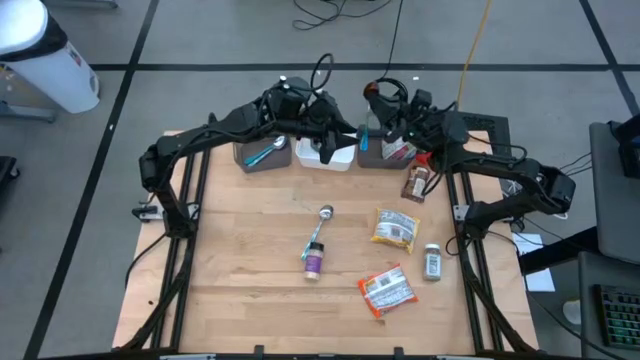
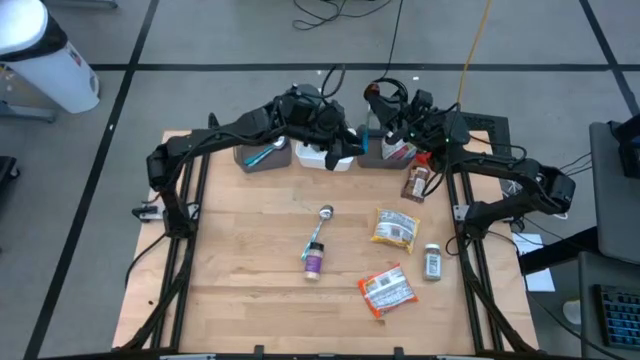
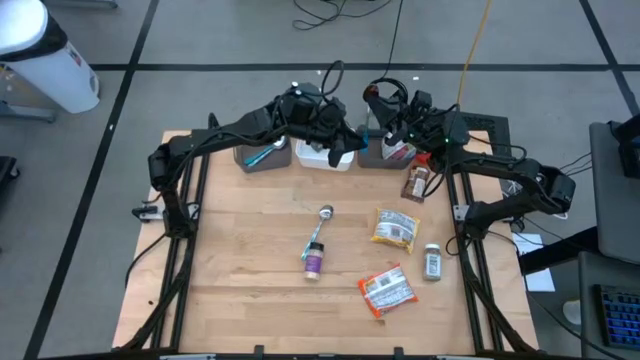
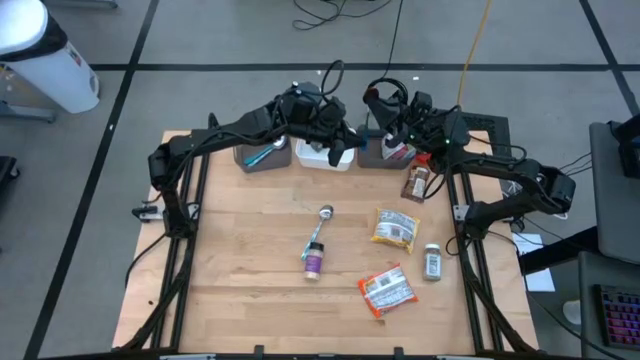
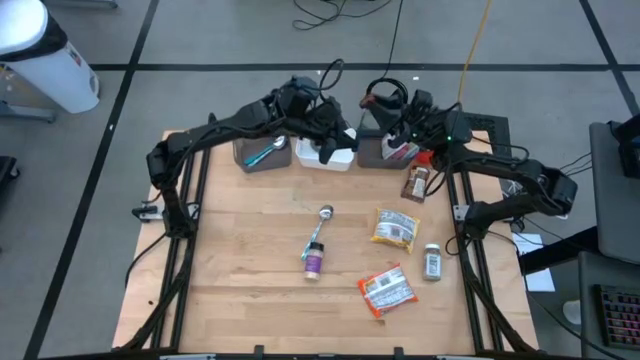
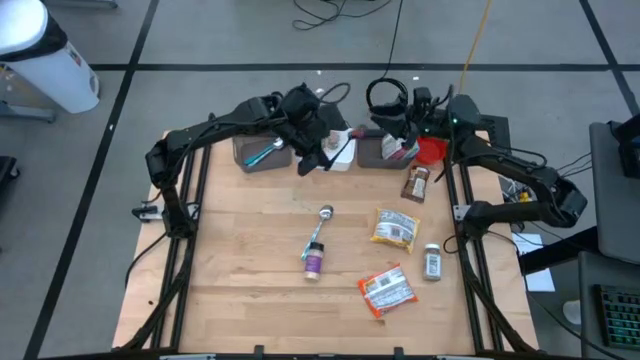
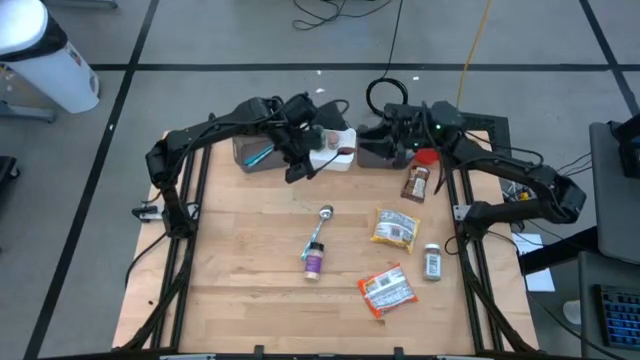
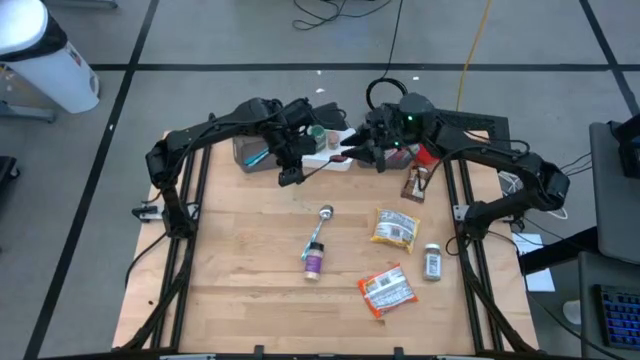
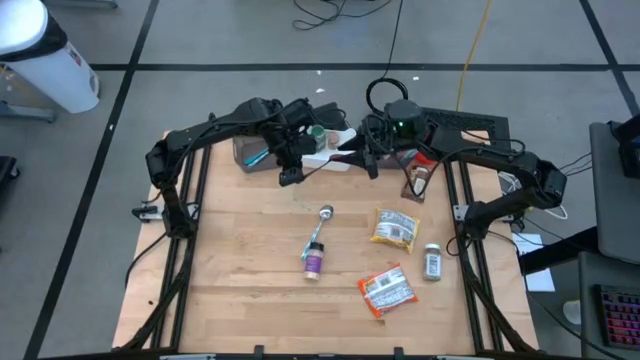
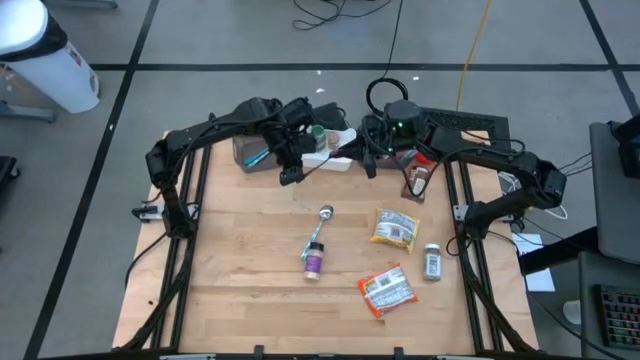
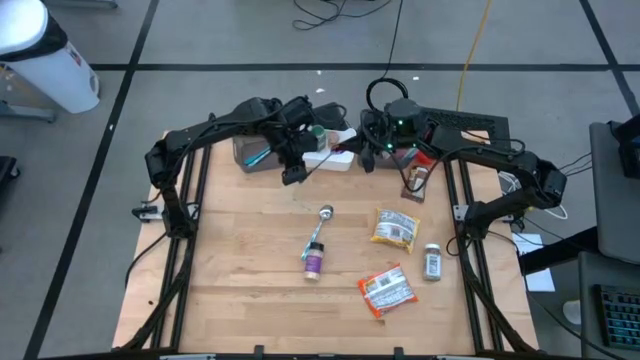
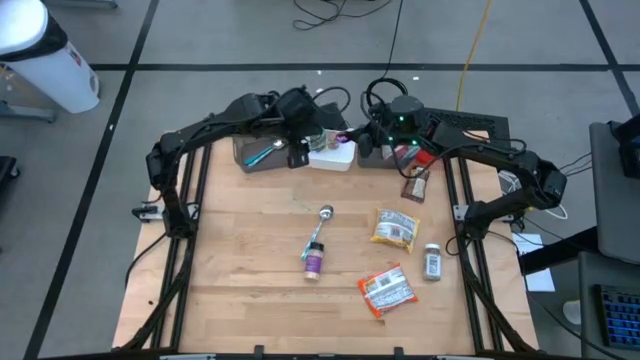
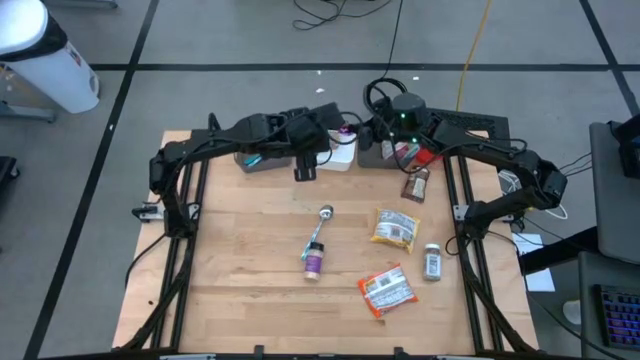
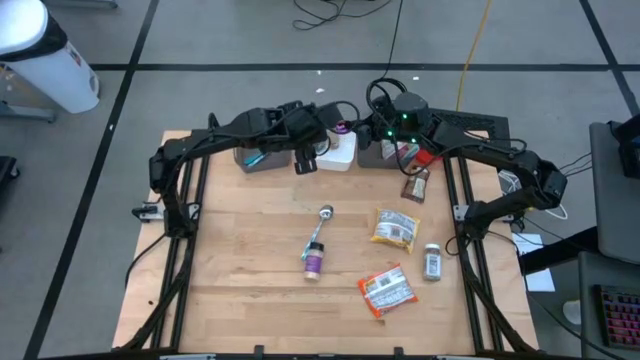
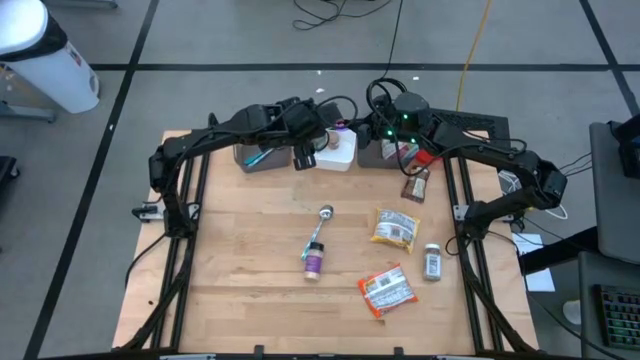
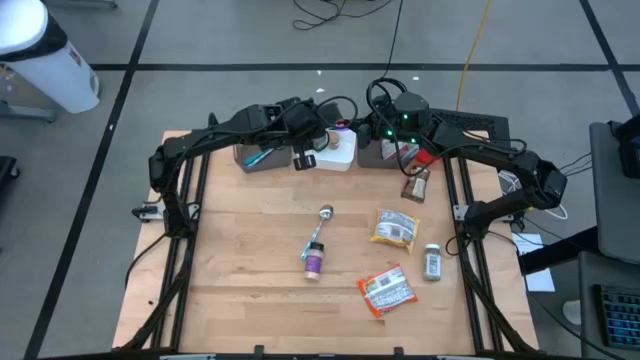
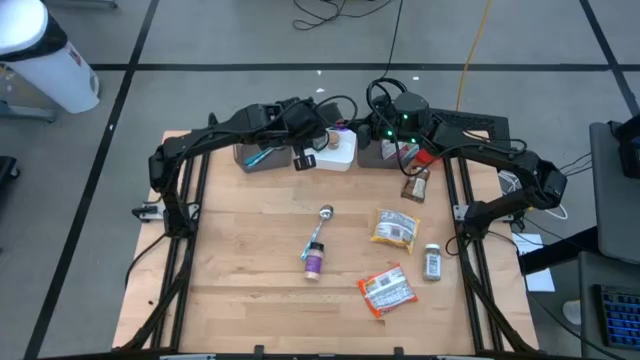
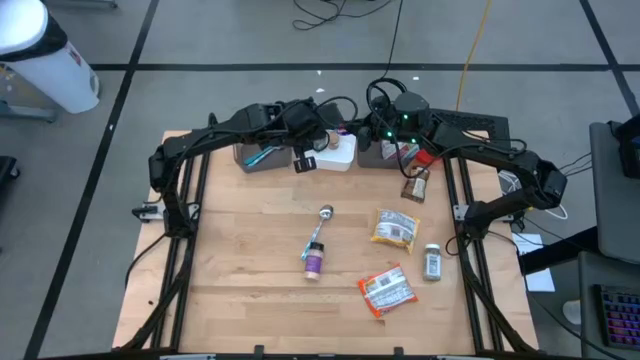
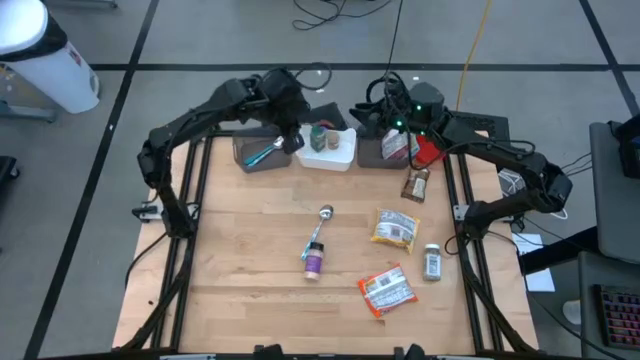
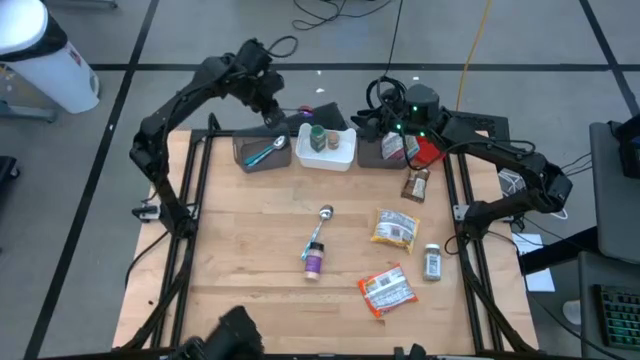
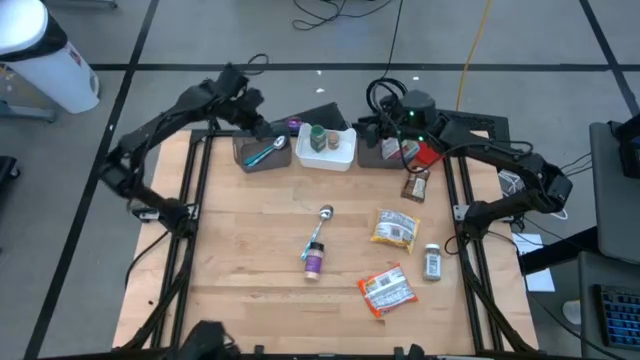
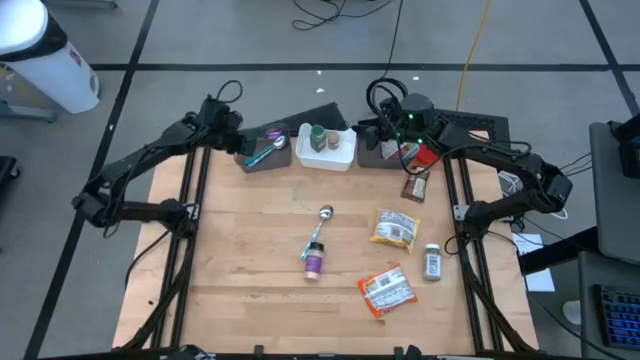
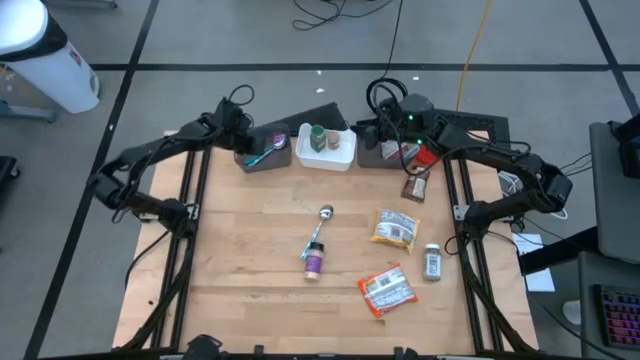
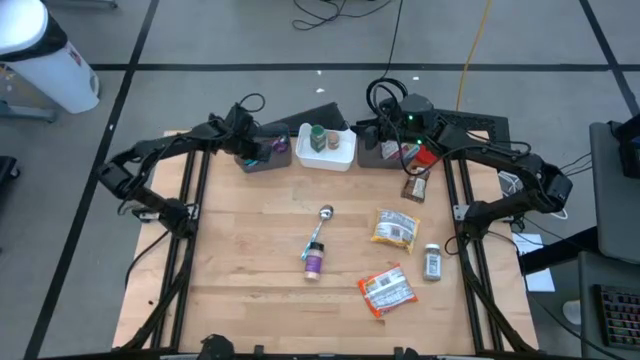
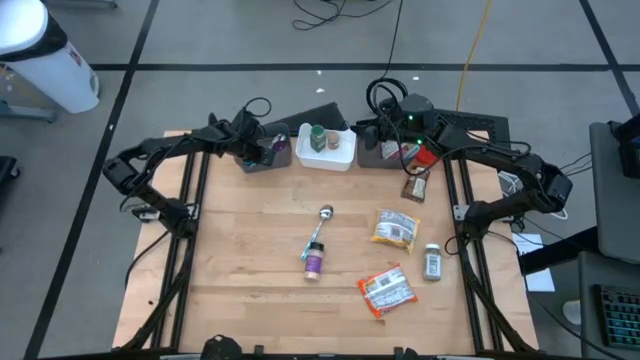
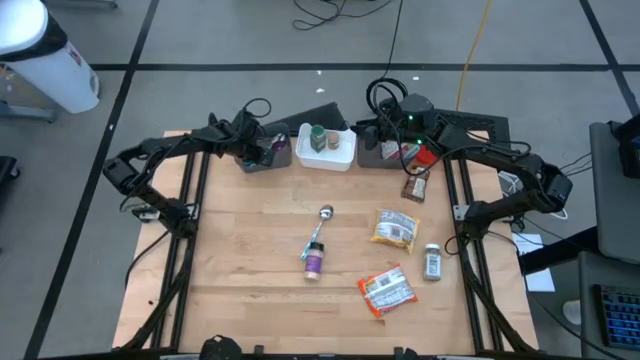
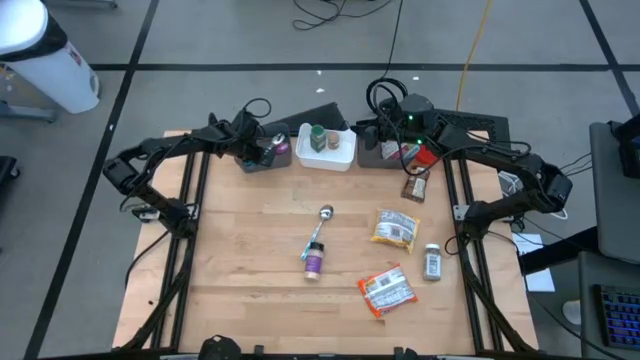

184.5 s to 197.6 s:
Task: Pick & Place Food Item
Put the blue spoon into the left black bin

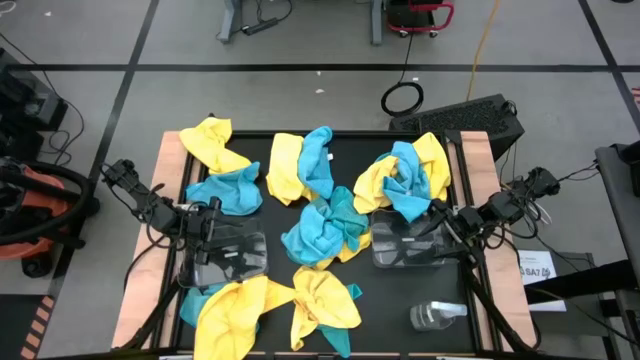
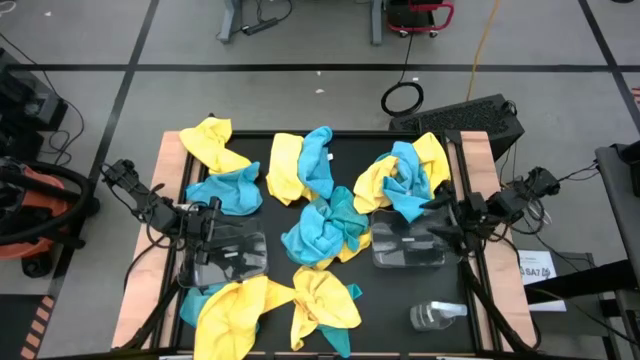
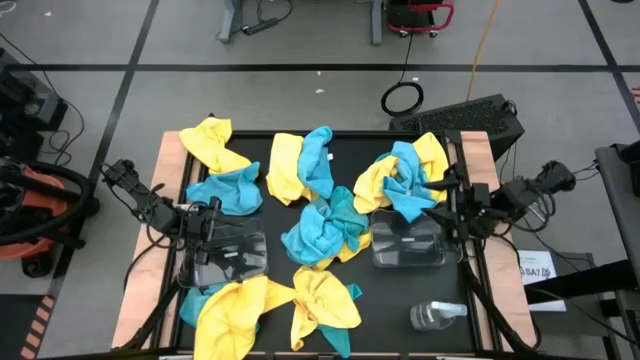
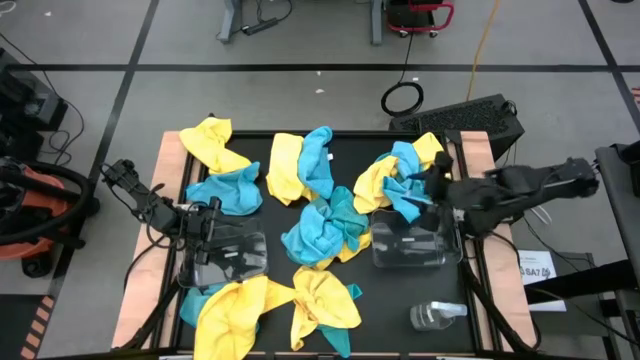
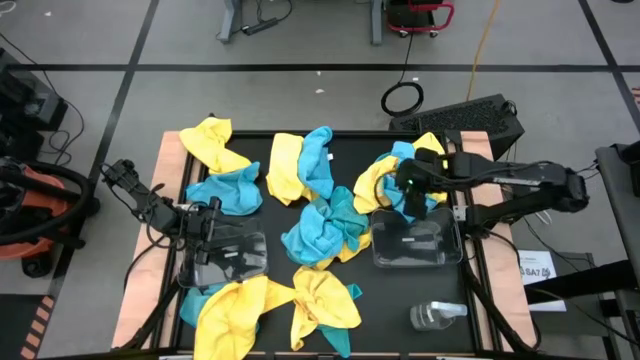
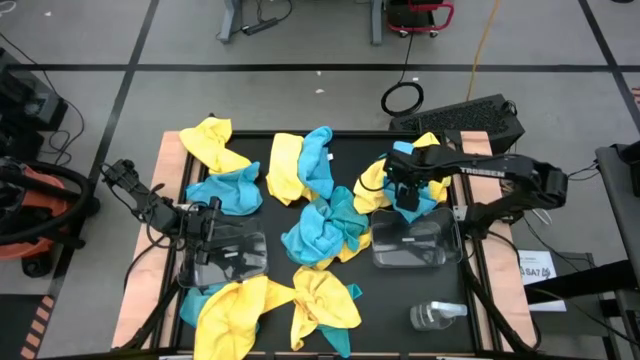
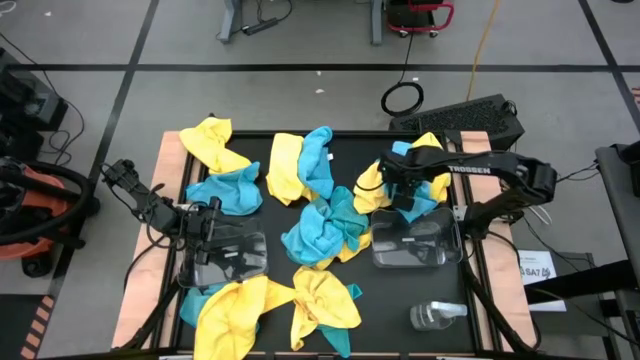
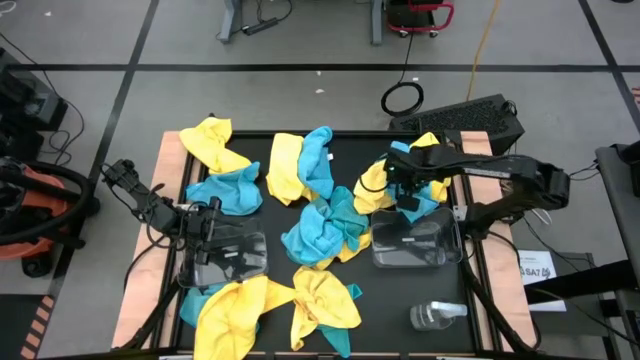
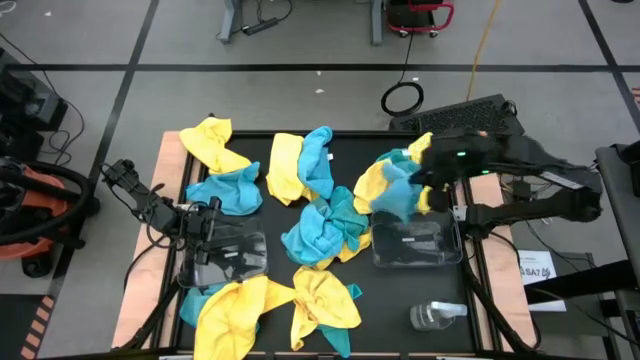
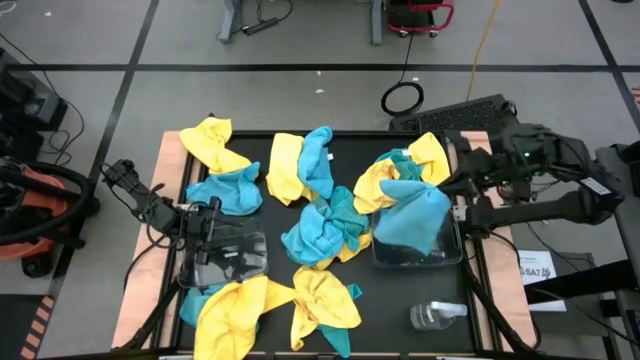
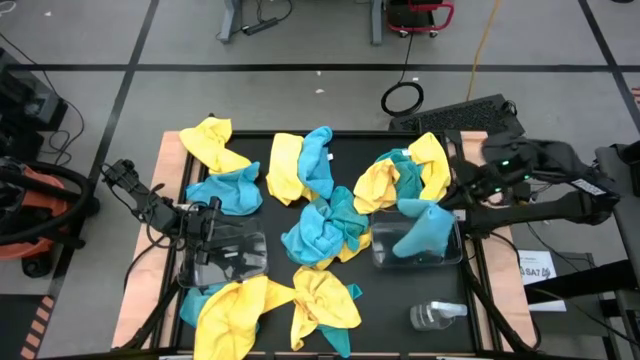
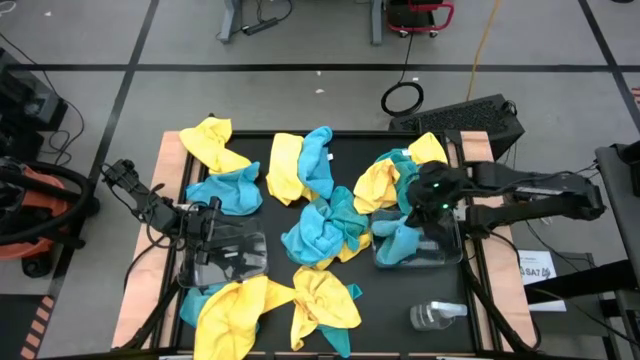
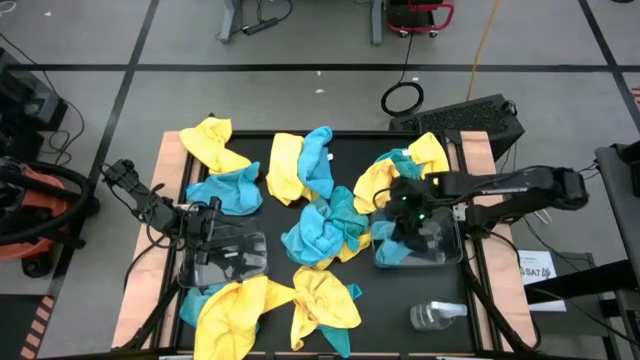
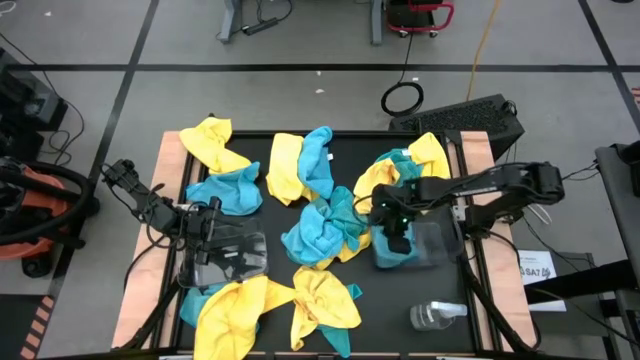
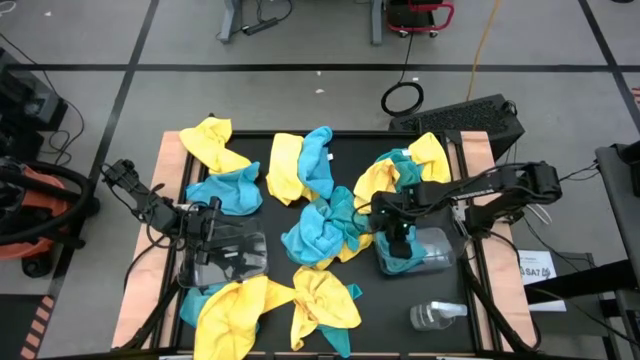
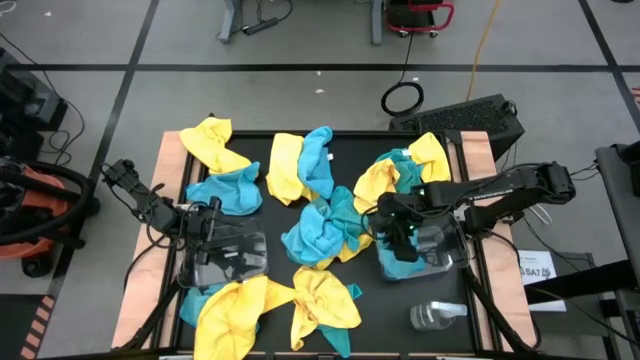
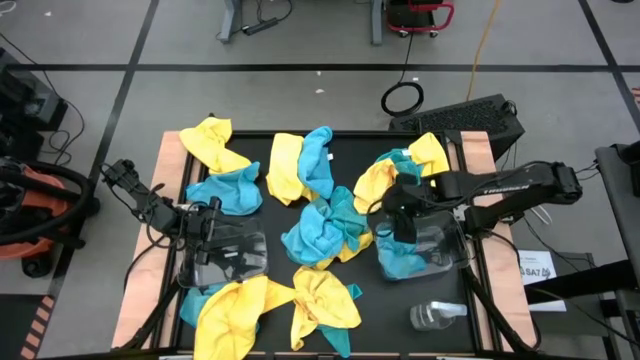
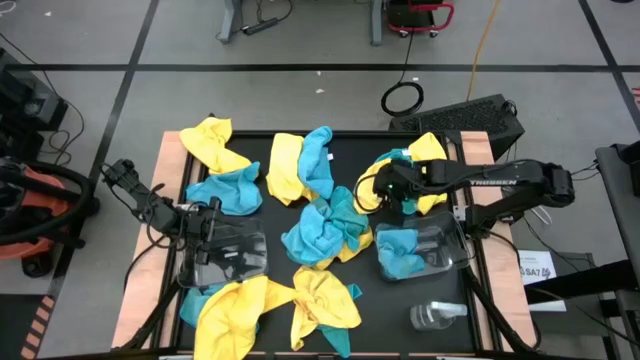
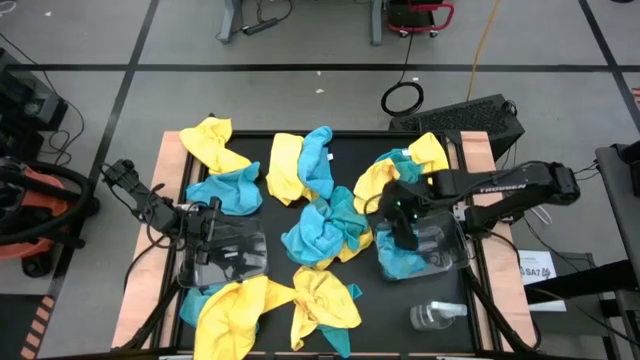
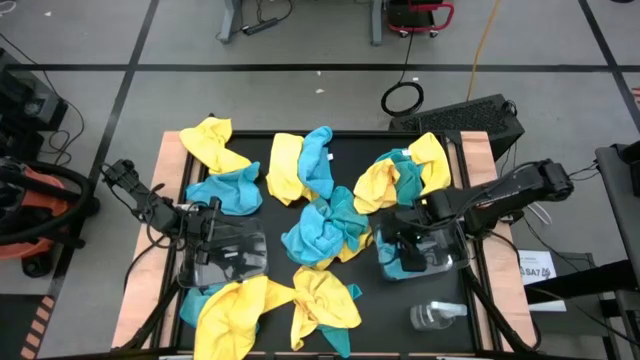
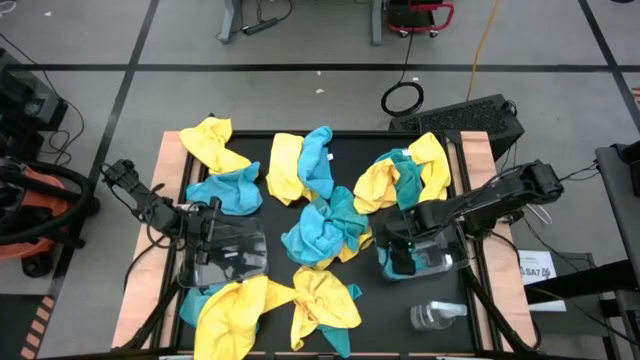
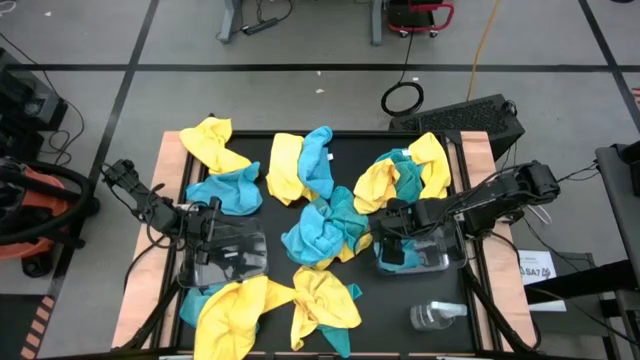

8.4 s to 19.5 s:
Task: Sort microfiber towel by color & place in baskets
Put the blue microfiber towel into the right transparent bin
